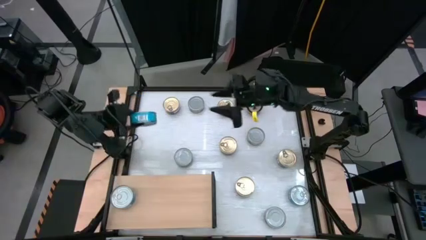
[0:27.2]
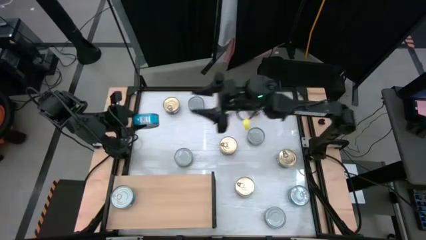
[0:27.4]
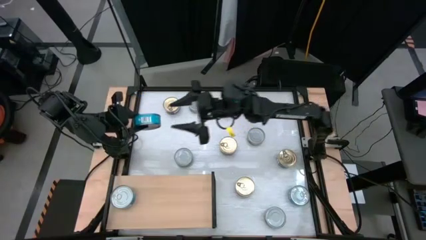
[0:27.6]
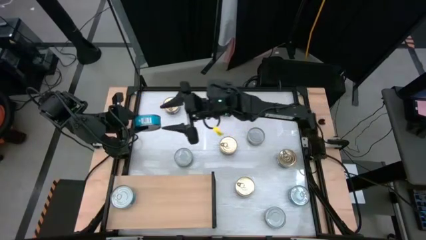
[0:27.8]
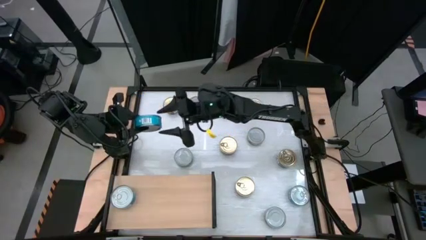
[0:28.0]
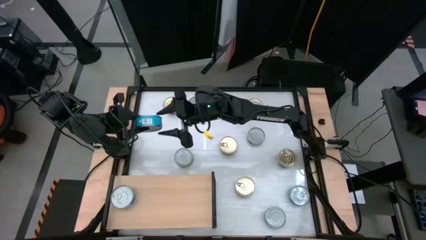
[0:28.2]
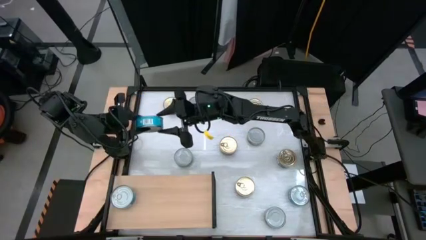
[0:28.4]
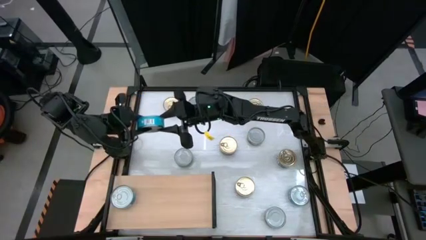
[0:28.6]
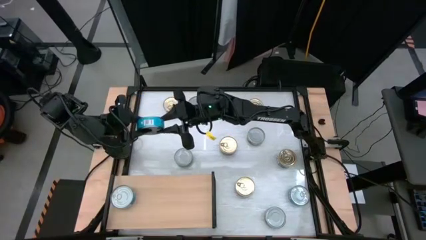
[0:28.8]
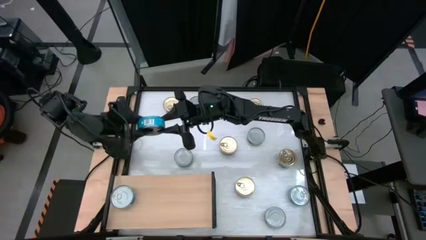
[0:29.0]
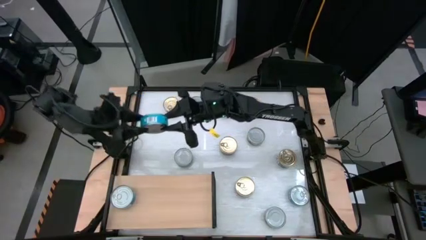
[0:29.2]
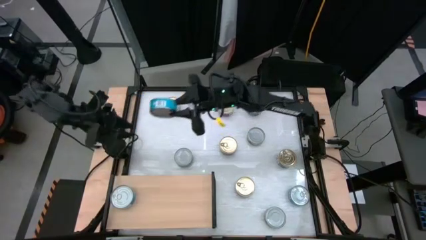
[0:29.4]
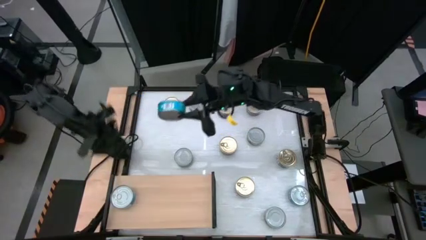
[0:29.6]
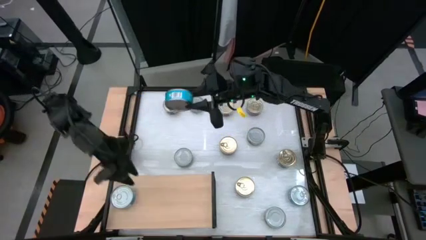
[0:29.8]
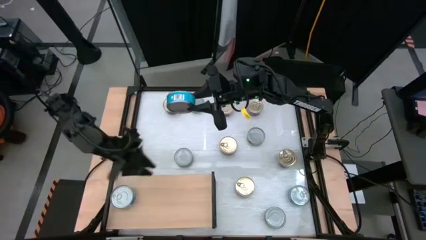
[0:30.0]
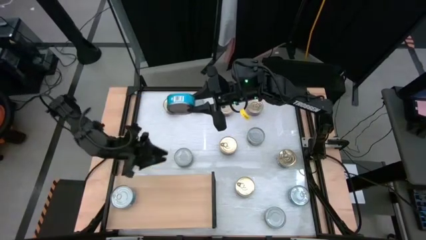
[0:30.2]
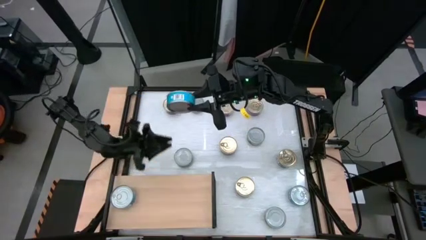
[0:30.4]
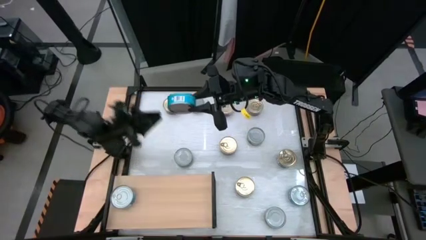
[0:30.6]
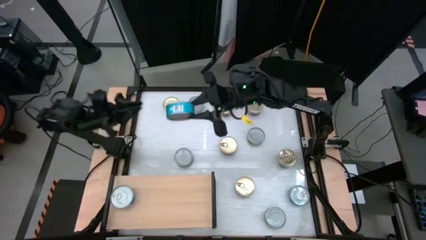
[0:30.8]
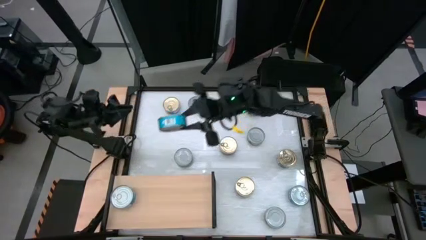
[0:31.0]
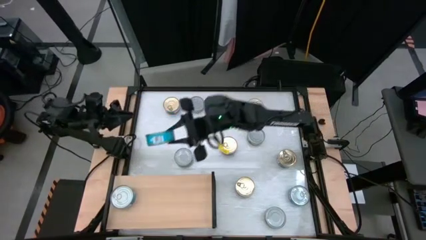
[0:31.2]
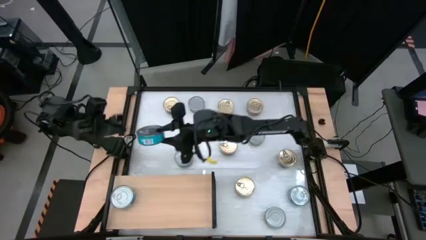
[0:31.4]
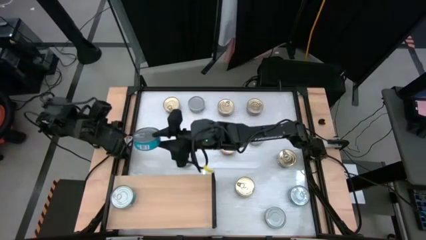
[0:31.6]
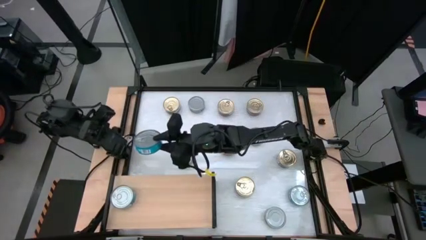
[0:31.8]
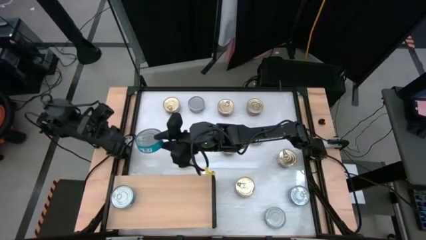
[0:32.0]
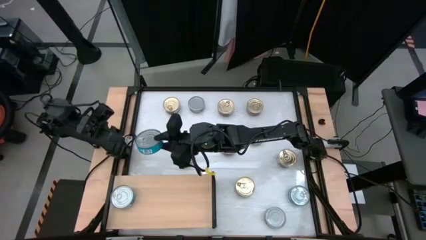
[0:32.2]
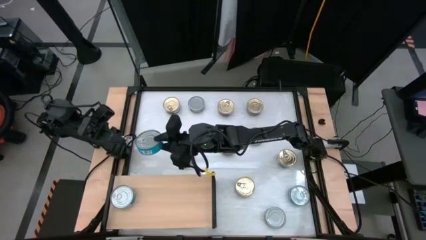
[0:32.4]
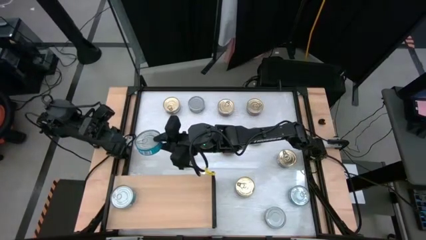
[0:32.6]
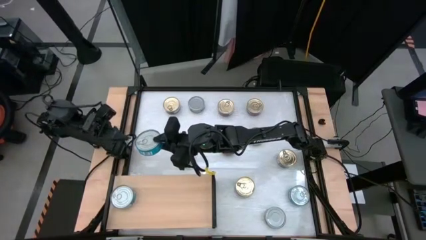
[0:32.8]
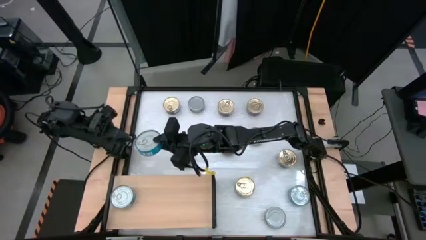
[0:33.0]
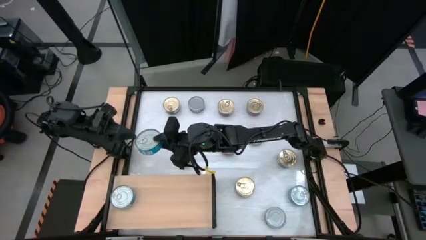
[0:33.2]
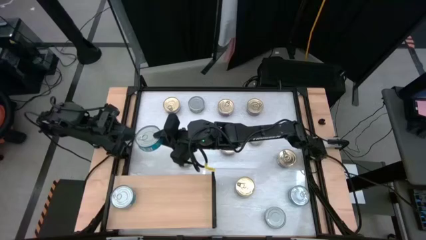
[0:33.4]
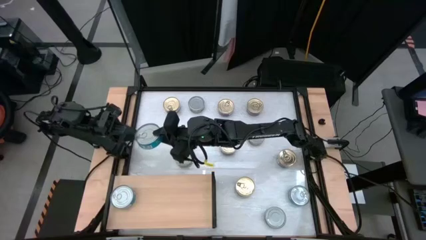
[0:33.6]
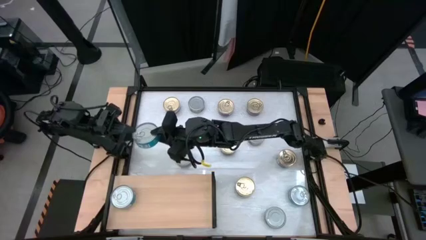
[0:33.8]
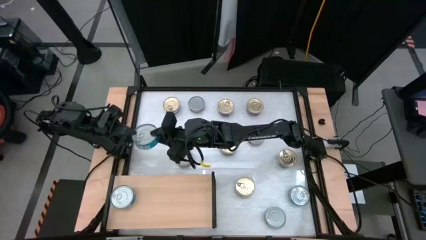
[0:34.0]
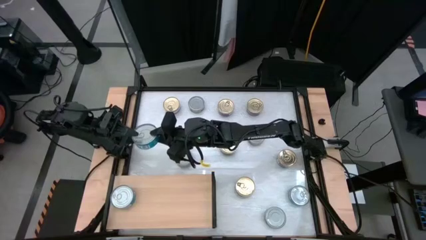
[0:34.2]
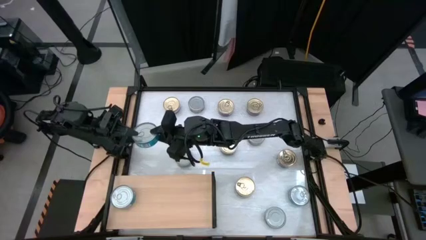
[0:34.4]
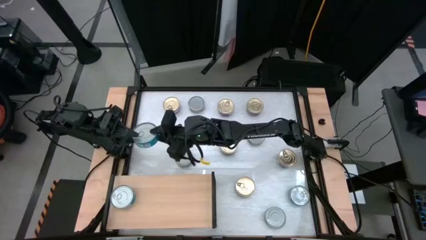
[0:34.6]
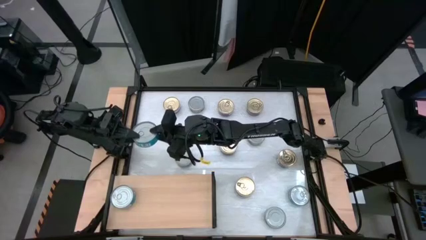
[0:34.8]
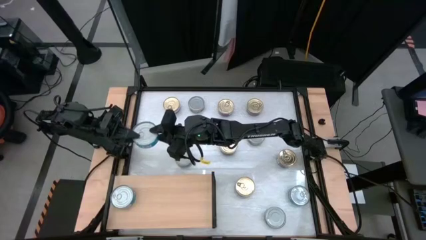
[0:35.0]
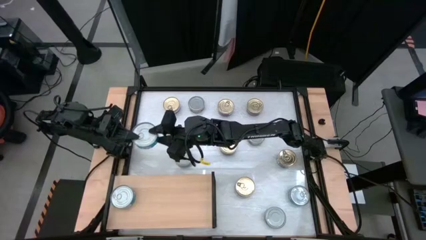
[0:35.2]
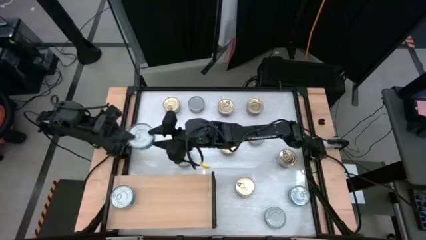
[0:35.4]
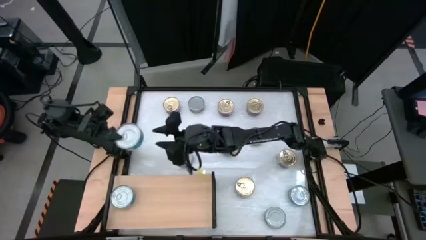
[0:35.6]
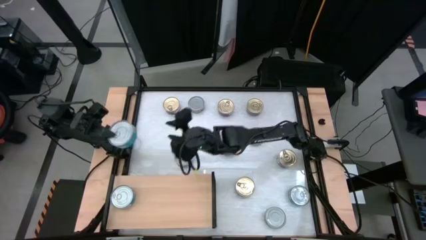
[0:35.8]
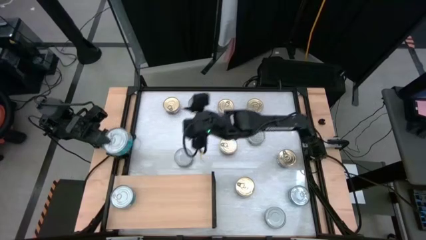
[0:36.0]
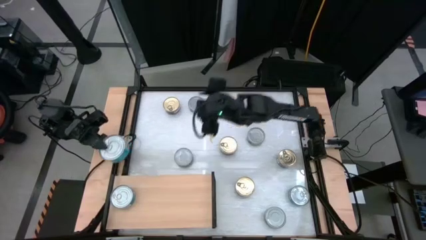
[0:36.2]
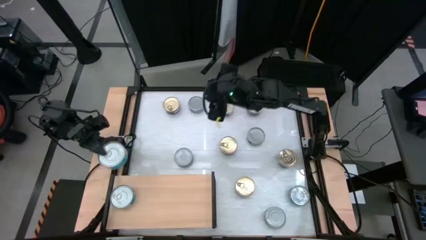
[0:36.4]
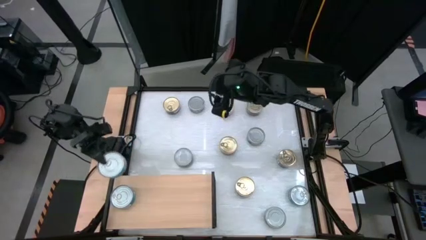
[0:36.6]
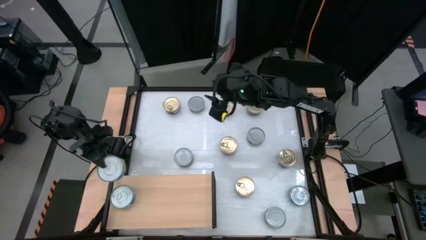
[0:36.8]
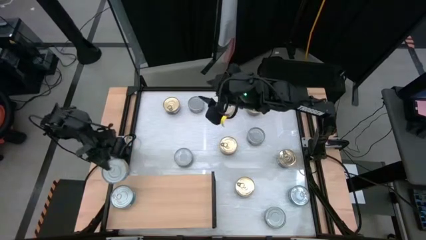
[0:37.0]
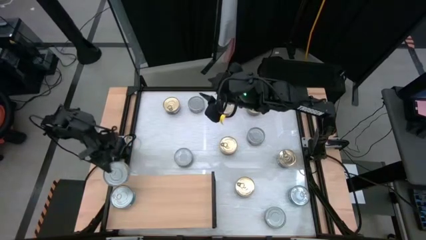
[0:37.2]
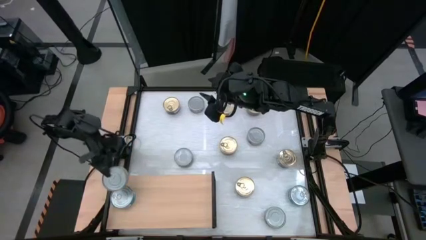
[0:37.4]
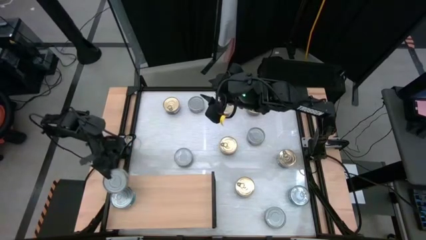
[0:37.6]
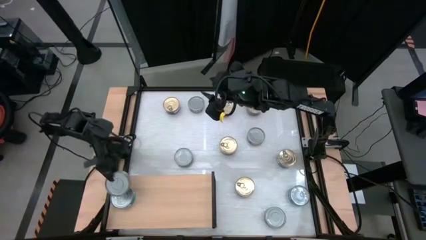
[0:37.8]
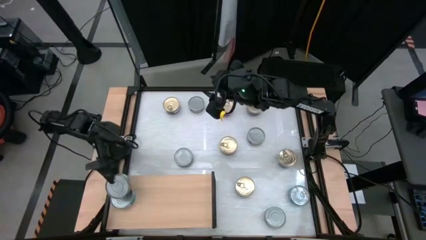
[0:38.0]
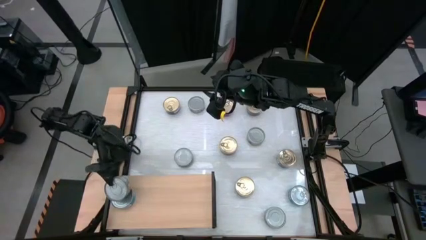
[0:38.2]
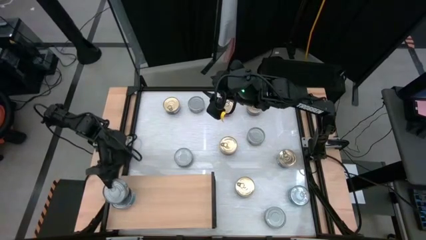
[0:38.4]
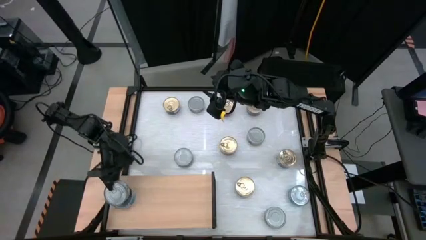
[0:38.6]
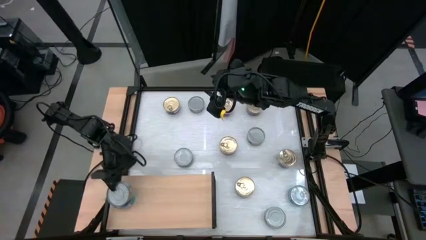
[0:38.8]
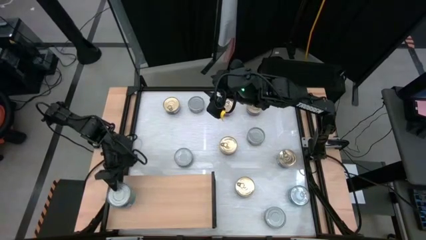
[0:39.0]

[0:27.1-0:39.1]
Task: Stack canned seafood by type on shelf
Stack the top yellow blue tuna can on top of the yellow blue tuna can on the shelf

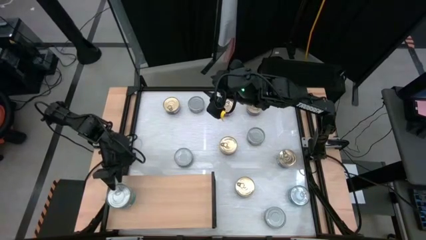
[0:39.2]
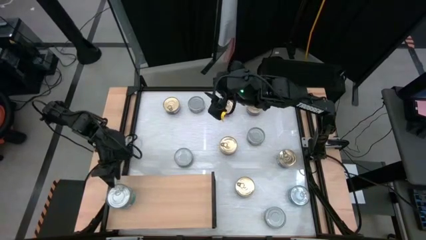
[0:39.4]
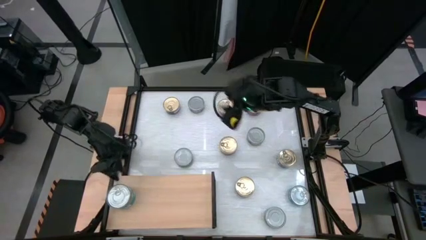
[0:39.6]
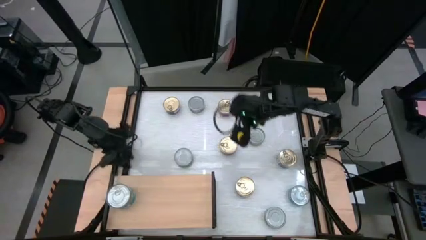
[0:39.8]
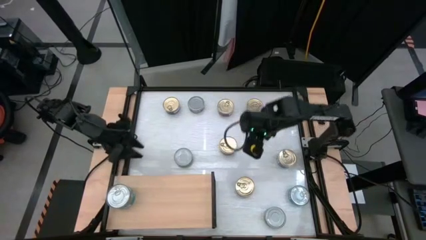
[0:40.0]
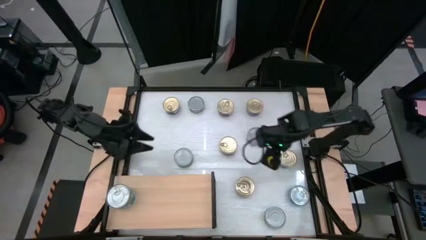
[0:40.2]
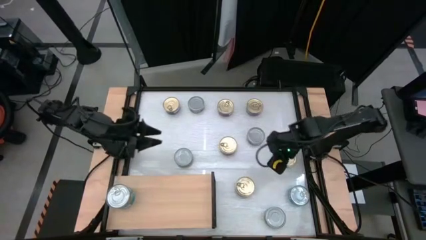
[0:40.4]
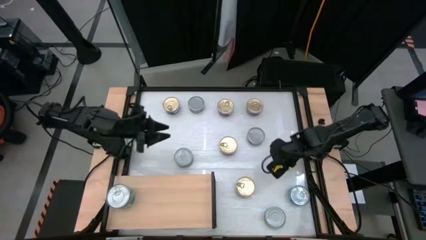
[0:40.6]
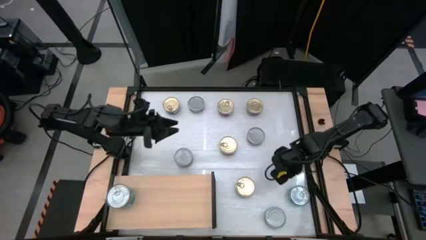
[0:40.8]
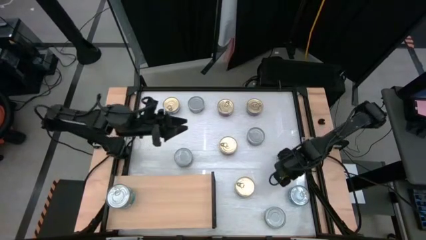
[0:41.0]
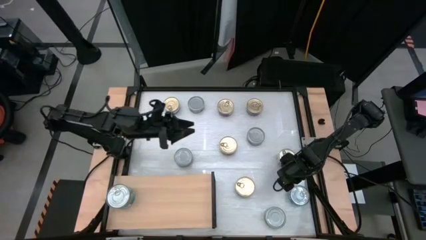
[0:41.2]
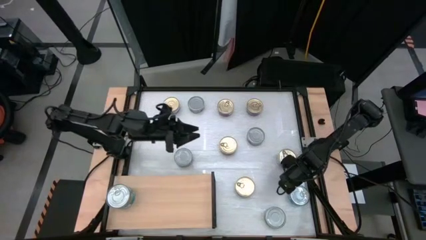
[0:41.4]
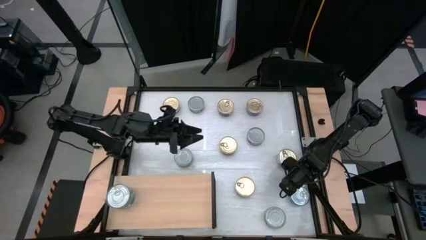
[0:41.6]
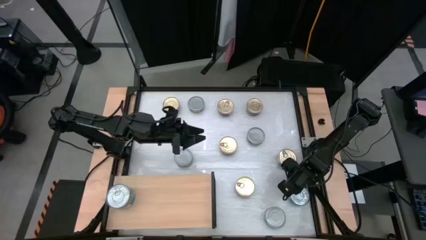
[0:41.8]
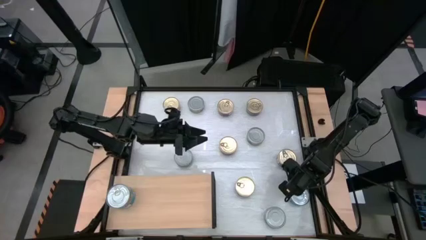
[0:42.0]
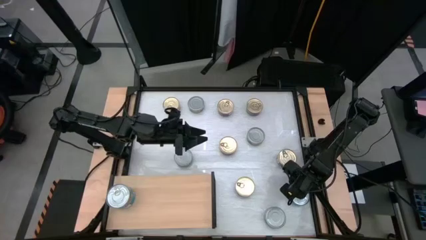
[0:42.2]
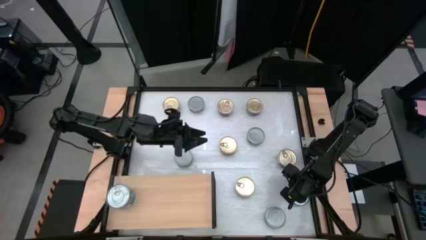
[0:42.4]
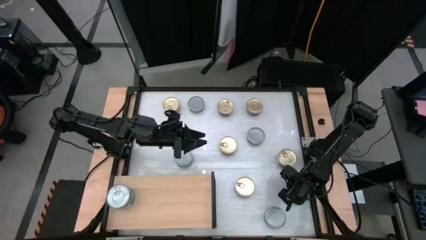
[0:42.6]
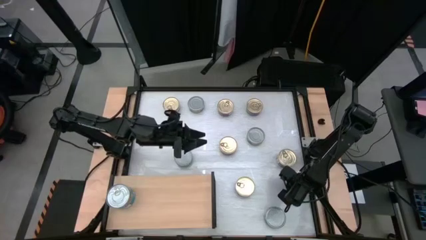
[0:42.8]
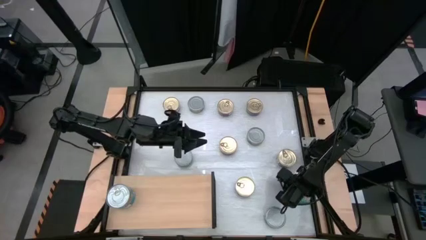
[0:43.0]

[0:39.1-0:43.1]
Stack the yellow blue tuna can on top of the yellow blue tuna can on the shelf
